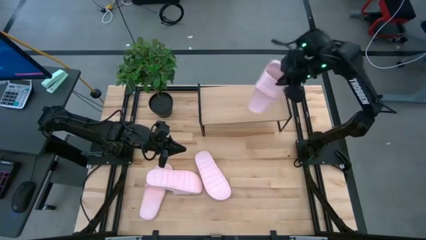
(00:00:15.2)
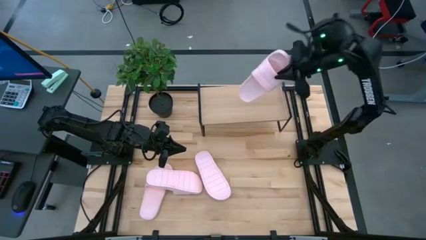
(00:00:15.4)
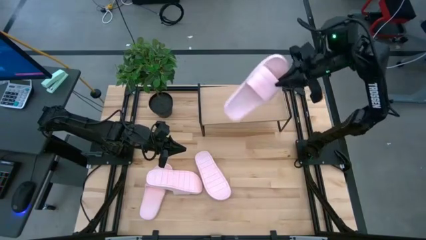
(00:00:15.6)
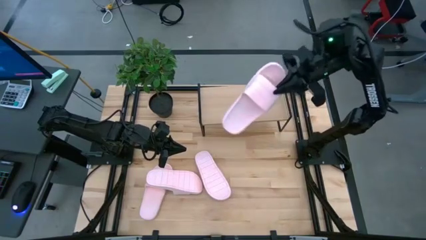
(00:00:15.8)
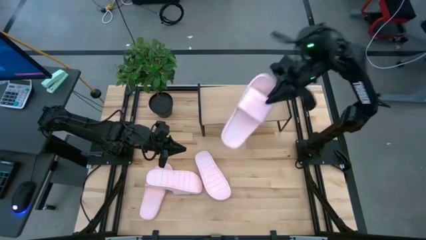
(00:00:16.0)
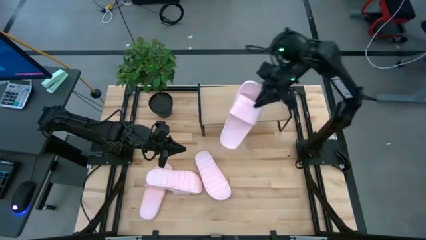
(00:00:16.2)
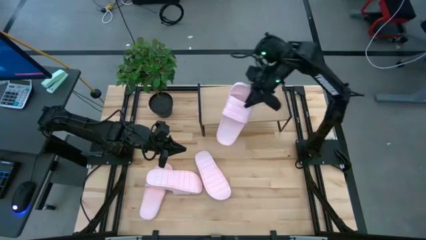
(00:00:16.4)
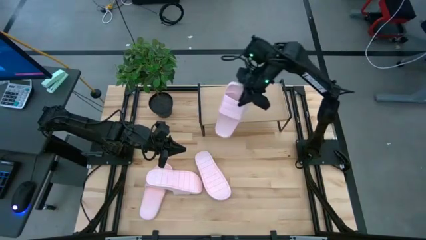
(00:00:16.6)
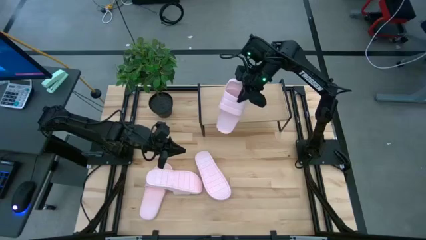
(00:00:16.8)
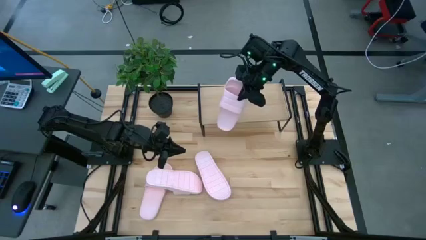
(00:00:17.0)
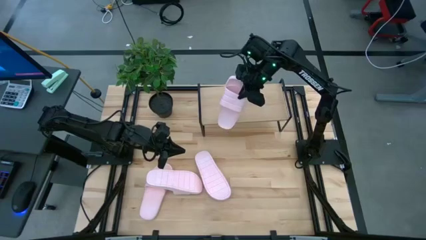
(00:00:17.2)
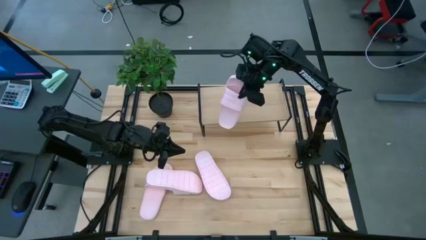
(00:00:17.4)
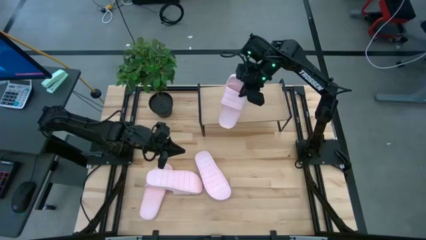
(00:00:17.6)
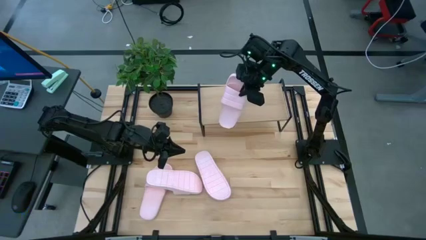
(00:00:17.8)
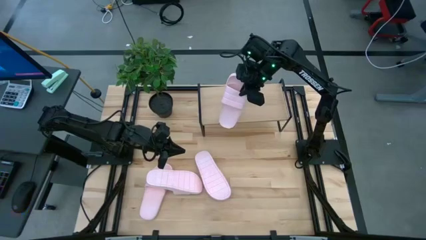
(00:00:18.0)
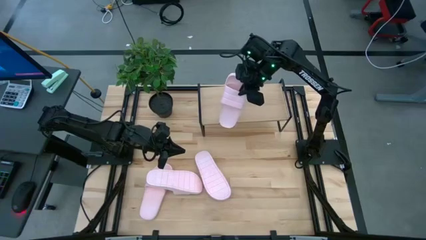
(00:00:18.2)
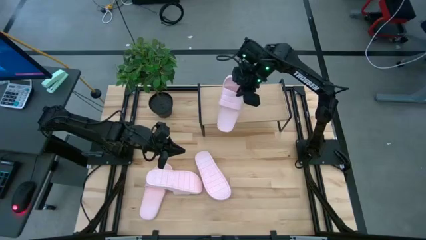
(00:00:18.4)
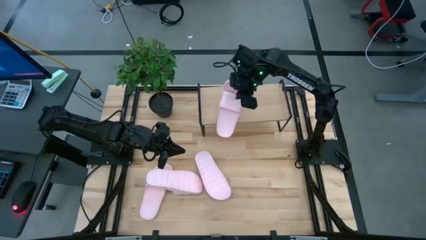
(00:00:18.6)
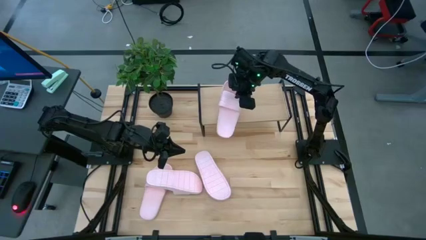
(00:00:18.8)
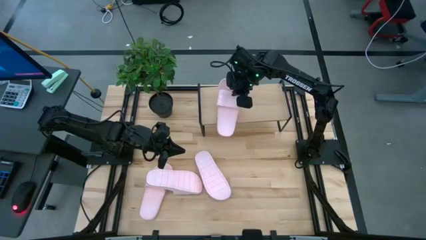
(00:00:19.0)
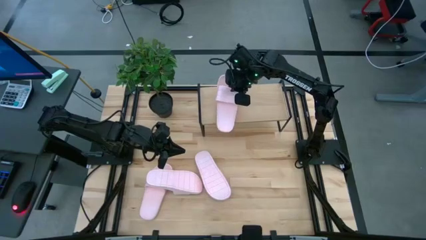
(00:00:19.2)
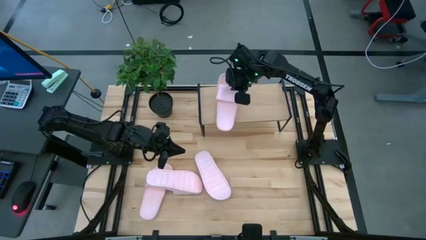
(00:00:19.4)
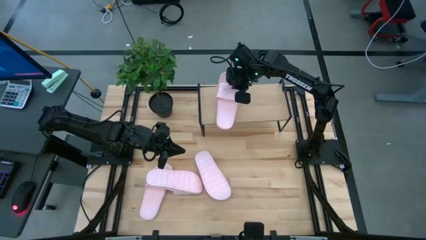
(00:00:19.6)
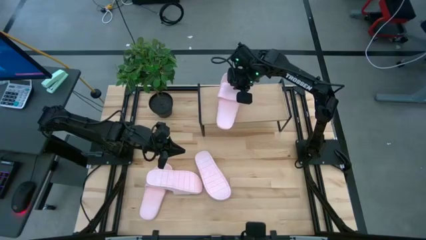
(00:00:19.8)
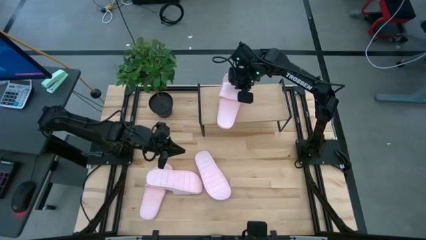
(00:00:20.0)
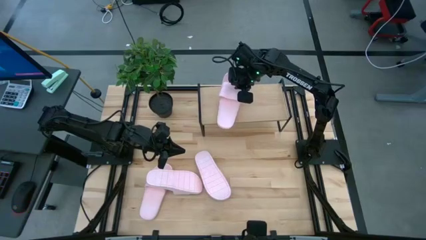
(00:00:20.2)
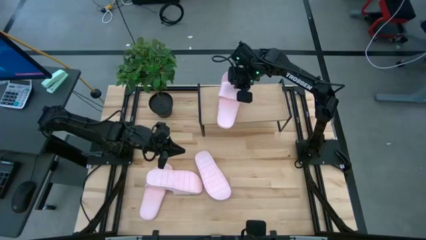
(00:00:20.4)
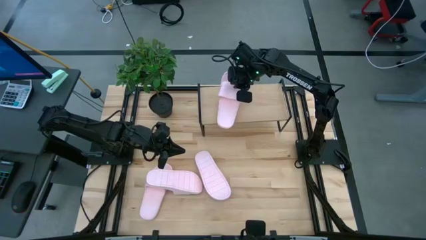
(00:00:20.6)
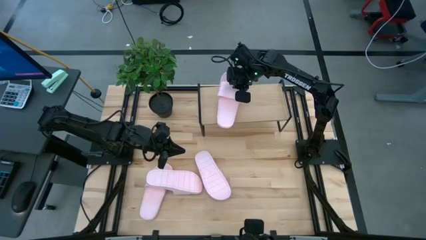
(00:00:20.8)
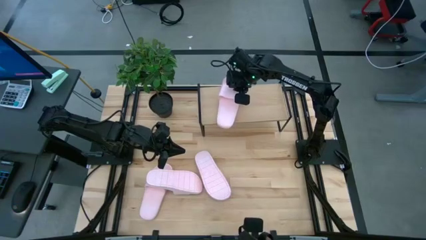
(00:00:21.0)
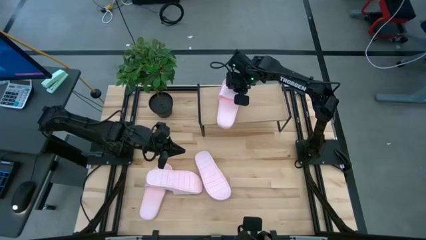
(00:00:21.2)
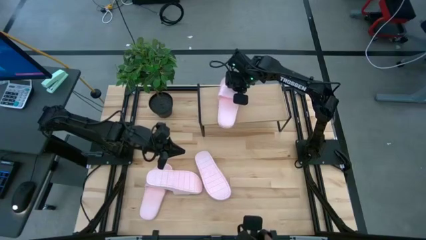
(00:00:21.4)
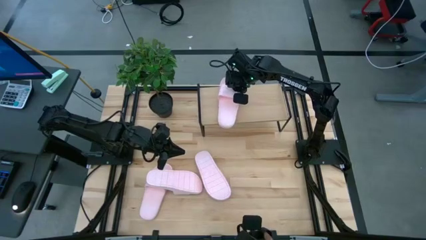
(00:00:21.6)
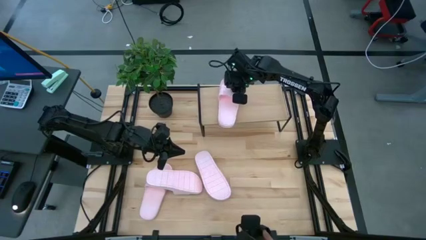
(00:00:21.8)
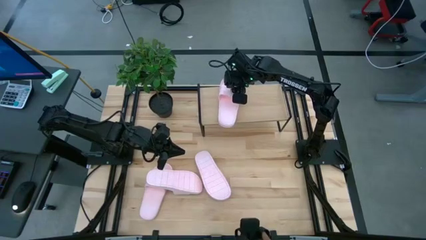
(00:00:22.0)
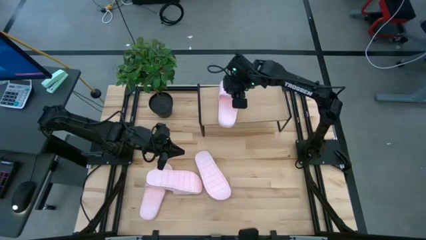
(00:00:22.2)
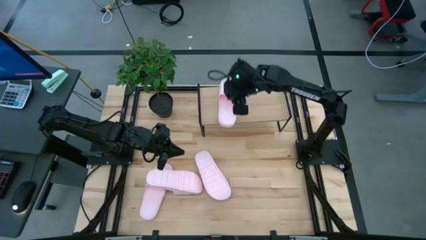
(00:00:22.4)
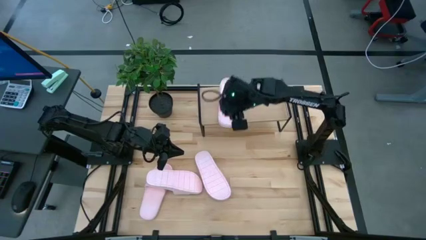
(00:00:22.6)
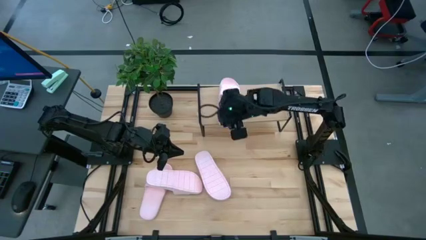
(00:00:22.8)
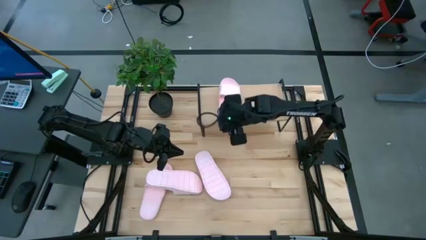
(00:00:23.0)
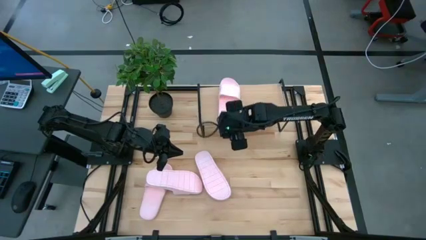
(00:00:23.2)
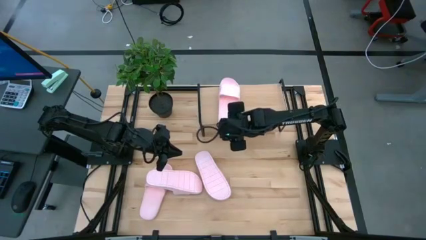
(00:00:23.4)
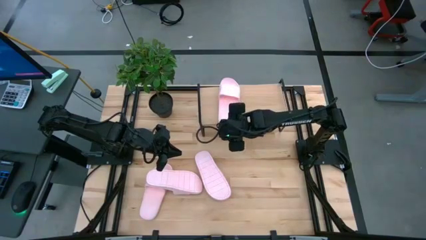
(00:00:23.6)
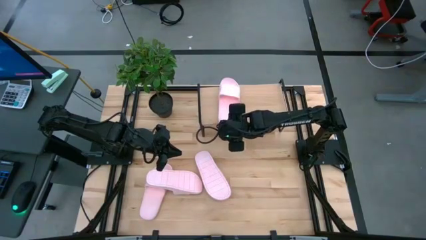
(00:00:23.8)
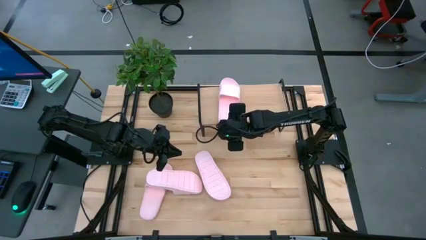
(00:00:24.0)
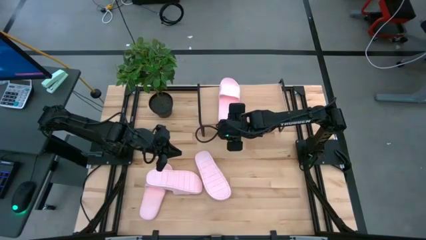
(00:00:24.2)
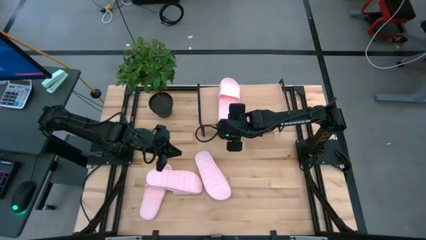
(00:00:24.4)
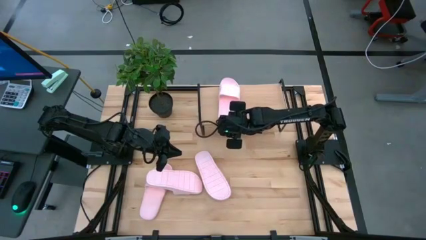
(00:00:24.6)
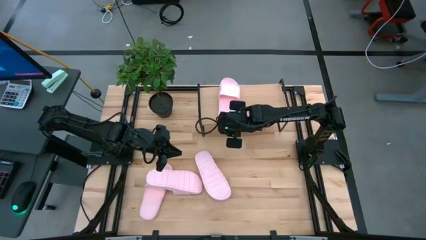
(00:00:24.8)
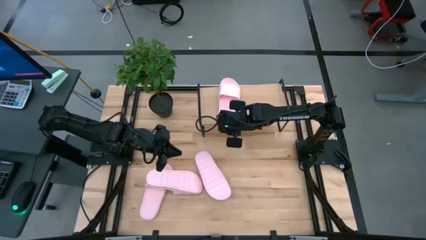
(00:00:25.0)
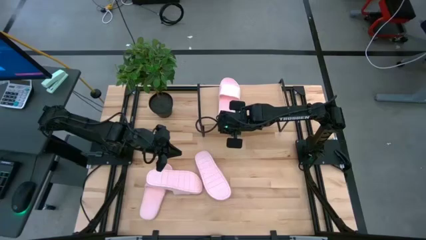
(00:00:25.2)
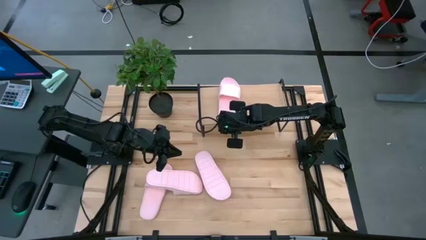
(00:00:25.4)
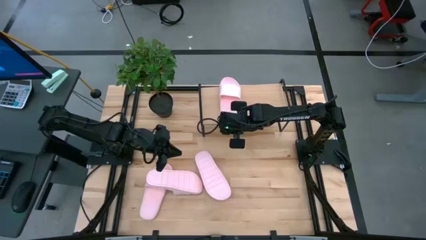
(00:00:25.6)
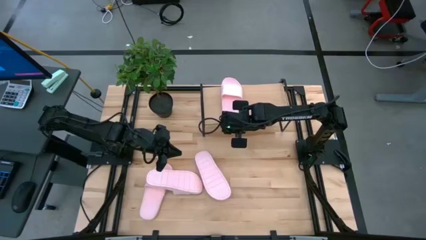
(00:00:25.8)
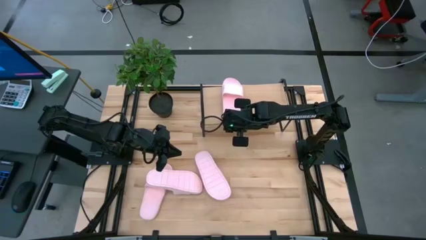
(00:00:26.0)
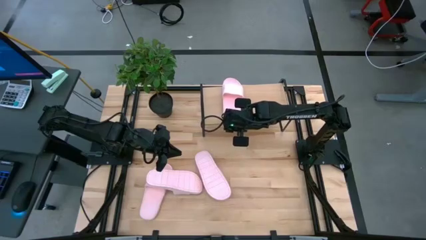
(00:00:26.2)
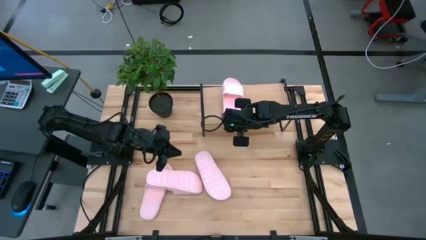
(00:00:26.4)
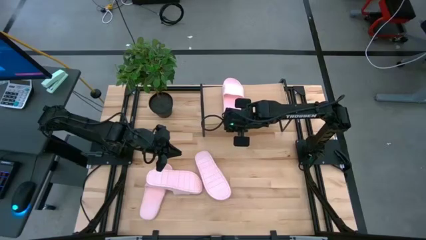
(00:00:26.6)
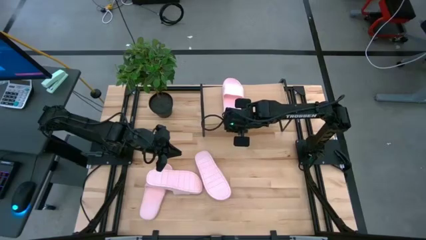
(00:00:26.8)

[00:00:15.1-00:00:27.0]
Task: Pick and place slides into the shelf
Put the right pink slide on the shelf
